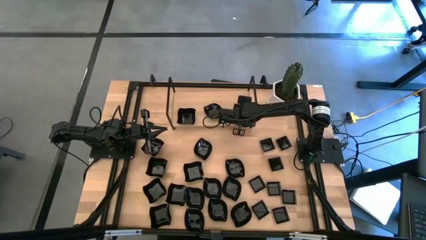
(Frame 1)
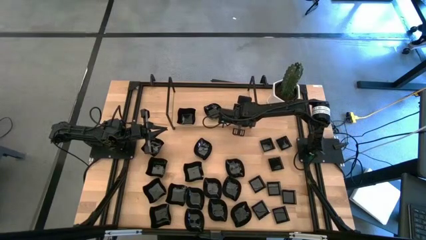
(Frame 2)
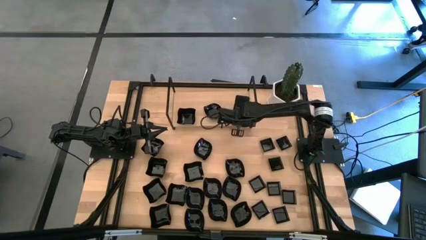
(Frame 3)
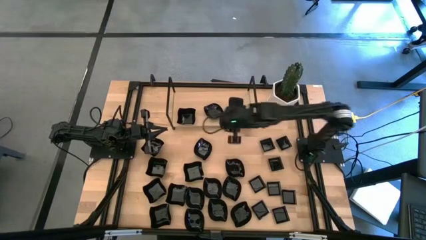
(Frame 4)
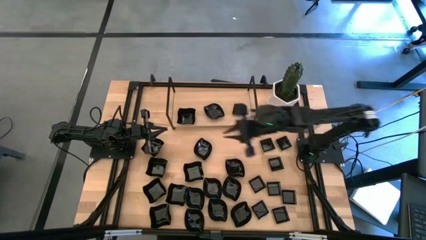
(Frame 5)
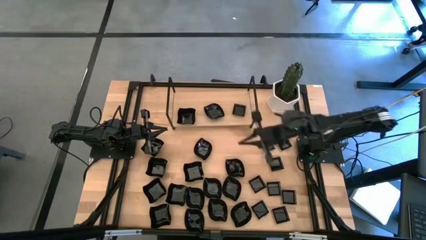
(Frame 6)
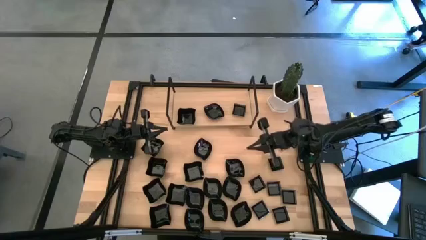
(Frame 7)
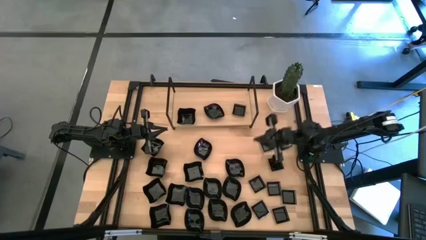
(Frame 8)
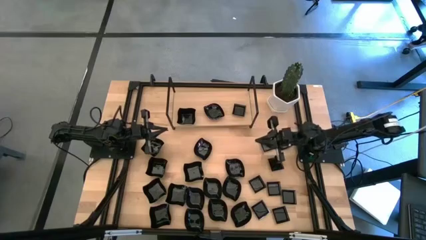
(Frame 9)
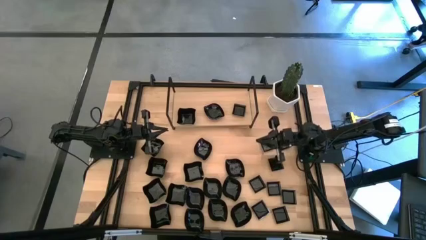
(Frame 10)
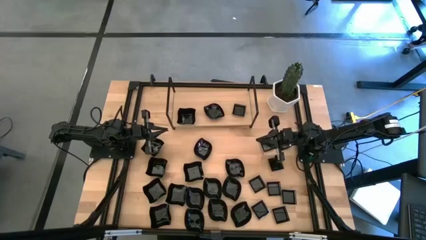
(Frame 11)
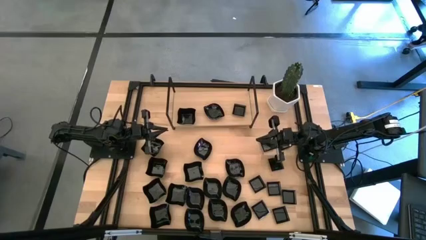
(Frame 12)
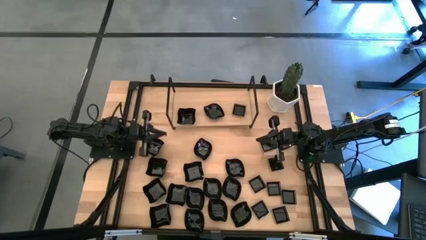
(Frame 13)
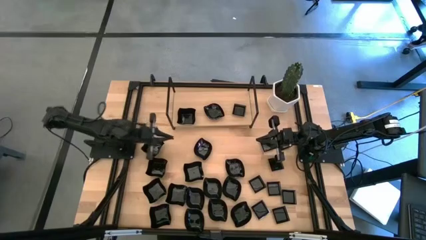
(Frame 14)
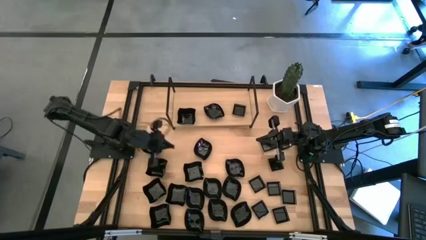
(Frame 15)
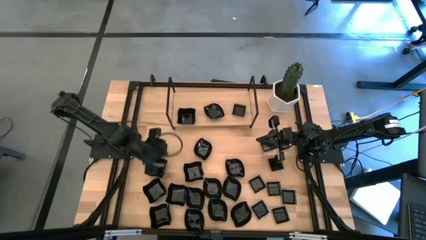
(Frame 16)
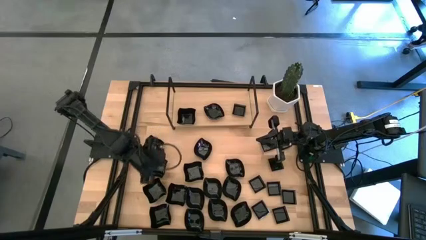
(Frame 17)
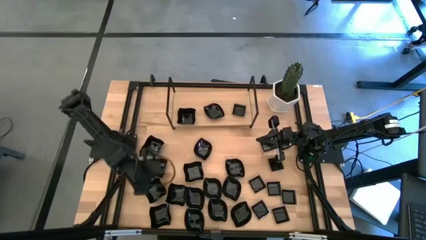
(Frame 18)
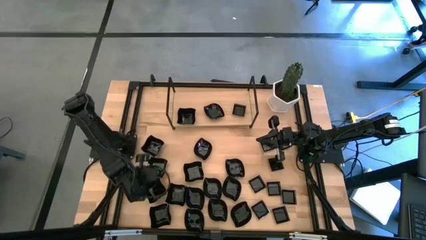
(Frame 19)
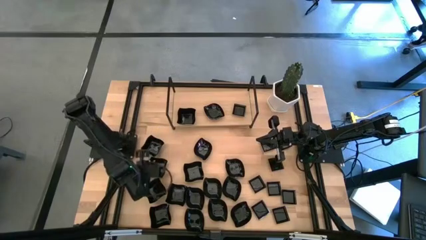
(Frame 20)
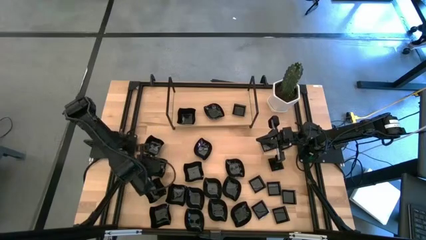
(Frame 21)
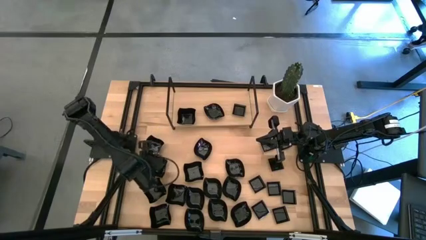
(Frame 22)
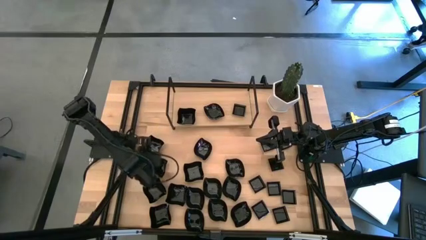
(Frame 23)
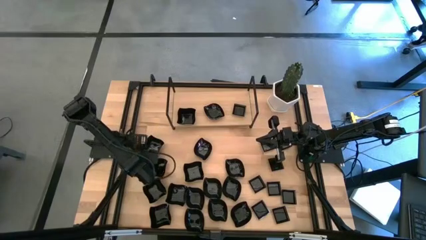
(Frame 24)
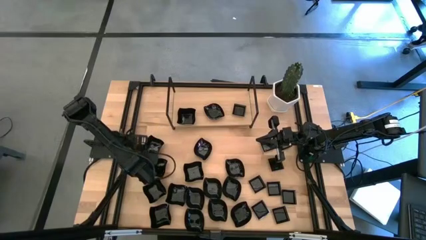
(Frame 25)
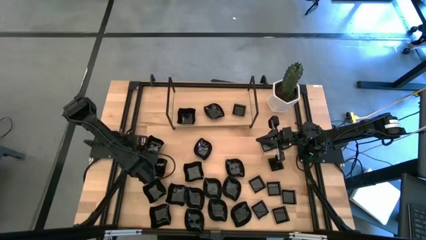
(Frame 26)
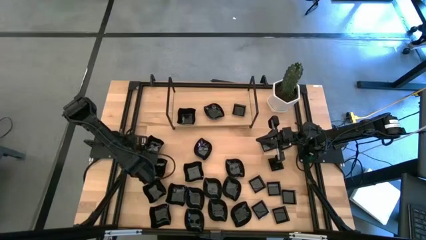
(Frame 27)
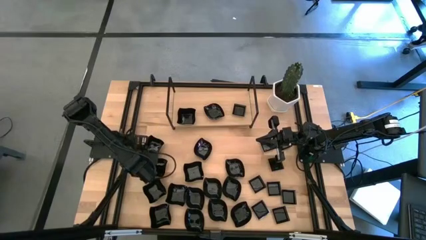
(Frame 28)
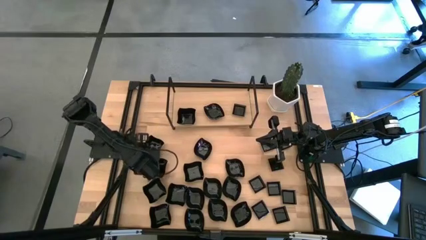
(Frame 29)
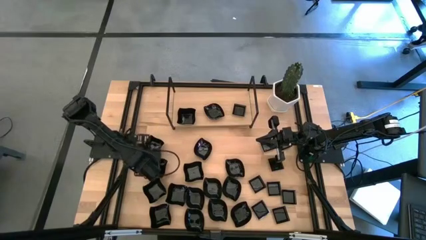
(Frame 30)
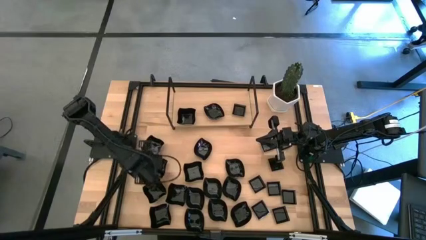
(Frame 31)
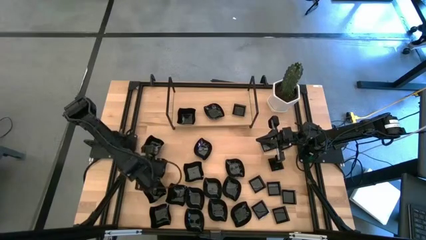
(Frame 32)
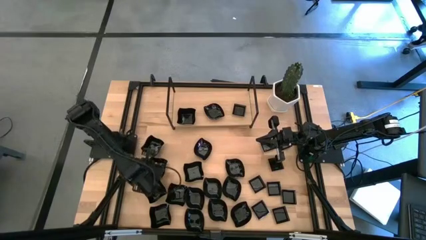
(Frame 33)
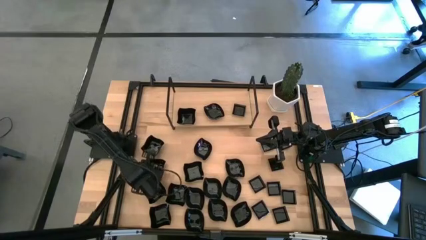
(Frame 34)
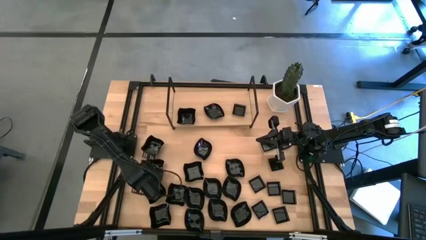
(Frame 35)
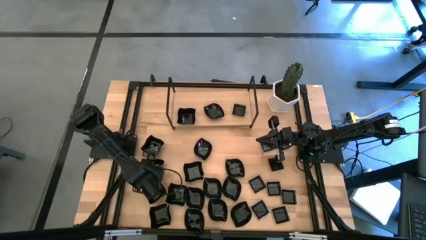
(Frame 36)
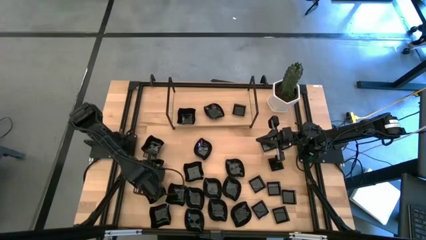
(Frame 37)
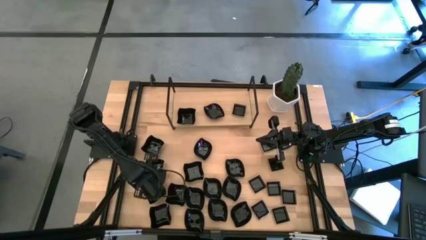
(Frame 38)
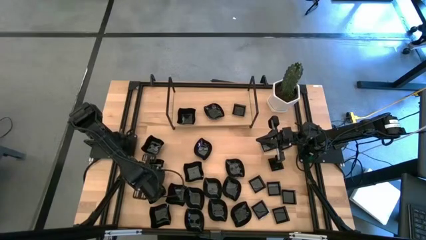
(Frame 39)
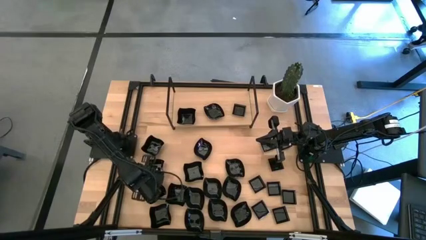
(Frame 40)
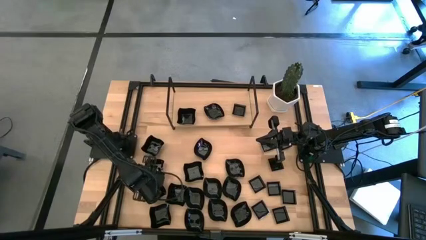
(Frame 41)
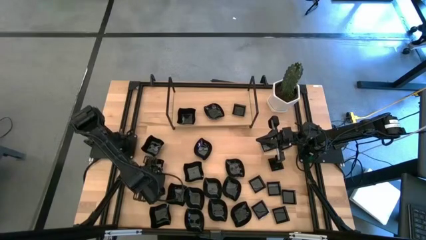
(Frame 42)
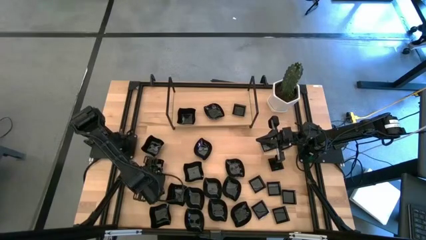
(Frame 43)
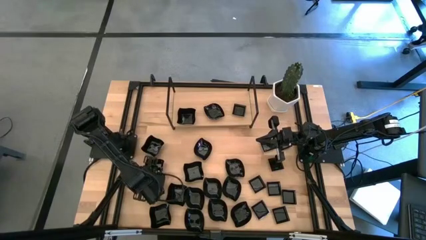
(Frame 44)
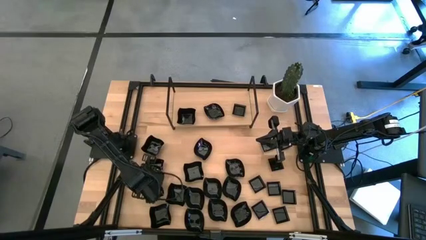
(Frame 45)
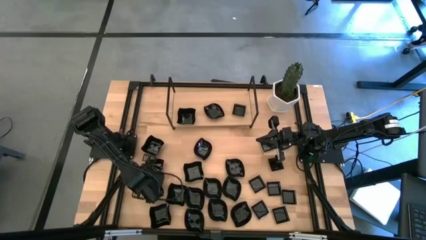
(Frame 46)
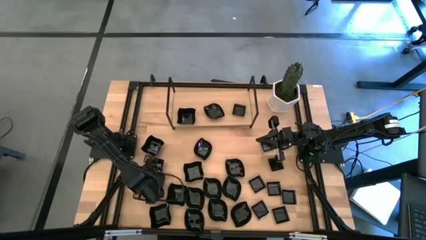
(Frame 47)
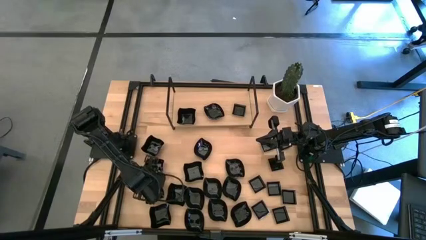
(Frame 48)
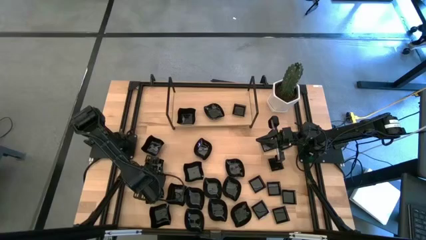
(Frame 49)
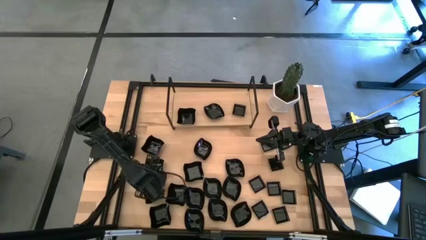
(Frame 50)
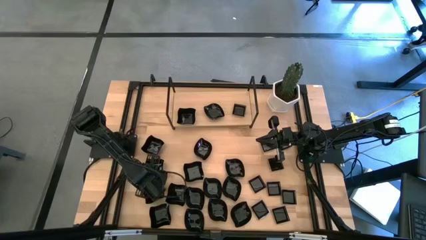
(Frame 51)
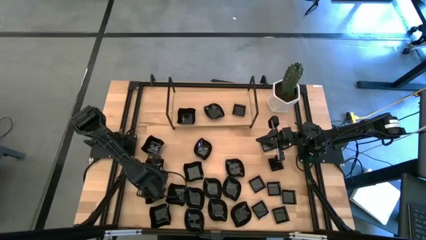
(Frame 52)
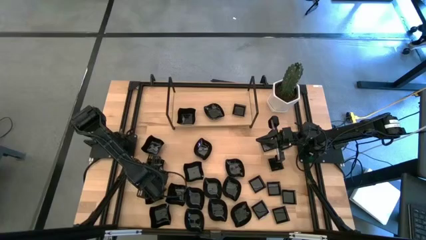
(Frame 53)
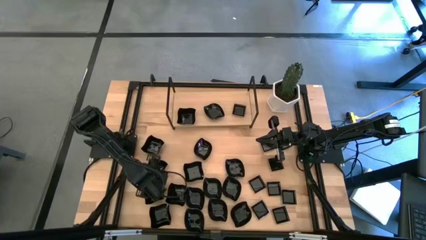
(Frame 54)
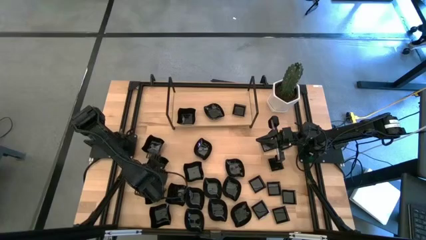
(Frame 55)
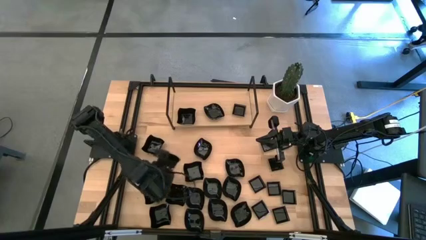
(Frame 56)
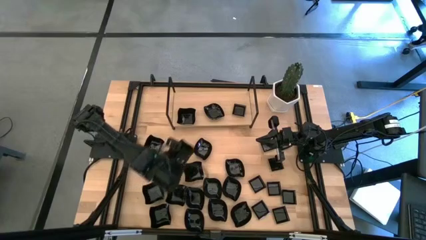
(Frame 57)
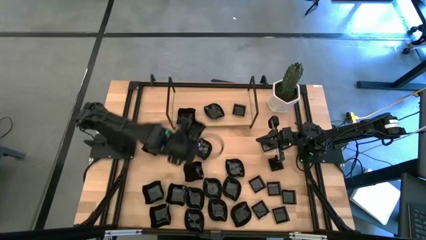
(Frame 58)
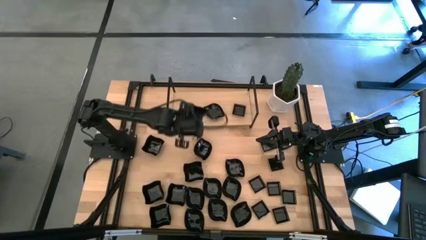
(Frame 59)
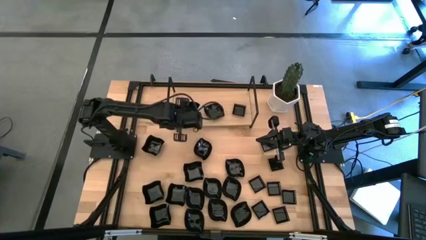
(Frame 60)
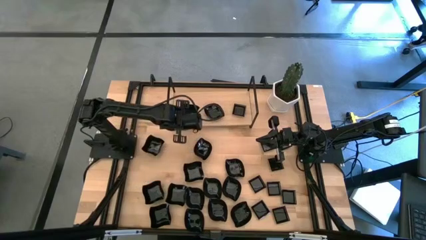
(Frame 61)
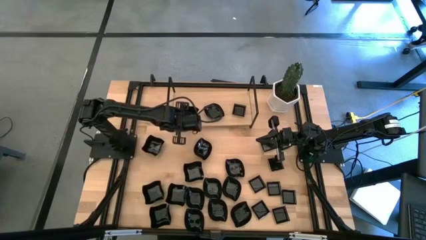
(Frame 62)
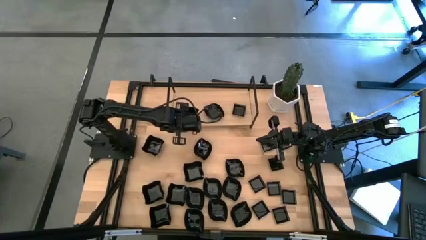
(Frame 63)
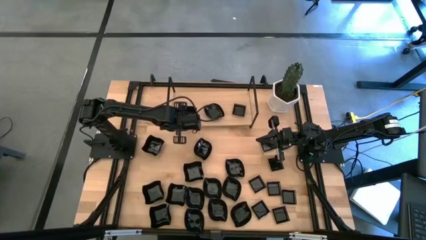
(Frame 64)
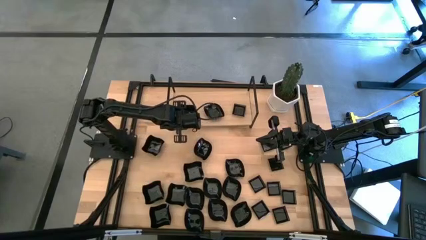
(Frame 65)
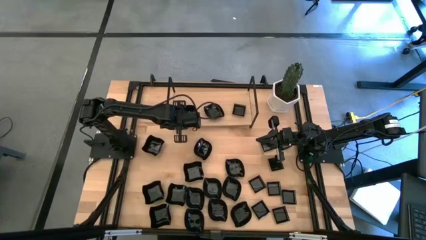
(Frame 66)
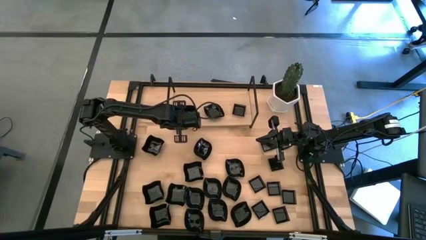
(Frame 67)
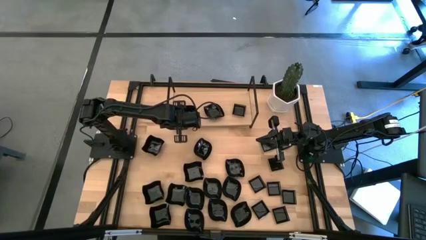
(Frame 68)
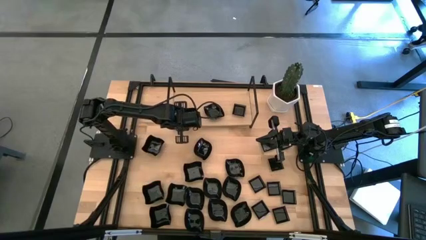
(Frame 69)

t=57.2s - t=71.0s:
Task: Pick & Place Mini shaped plates
Stack the black distorted square plate on top of the black distorted square plate on the shelf

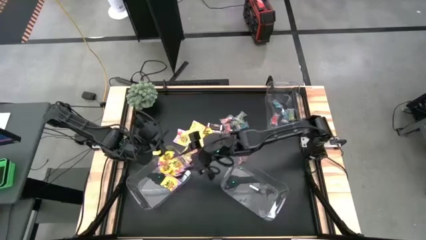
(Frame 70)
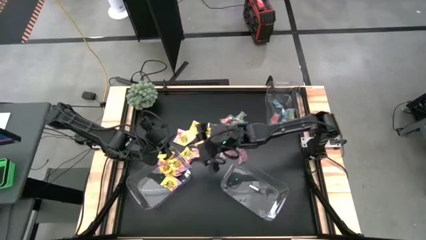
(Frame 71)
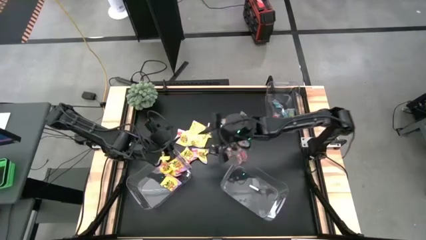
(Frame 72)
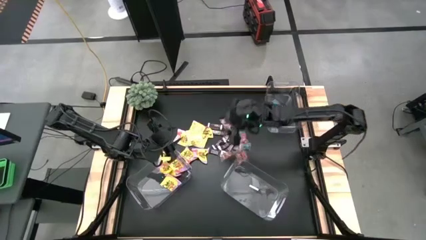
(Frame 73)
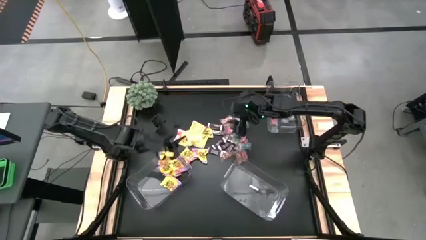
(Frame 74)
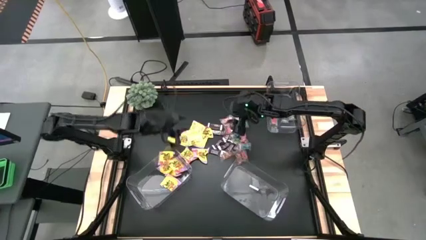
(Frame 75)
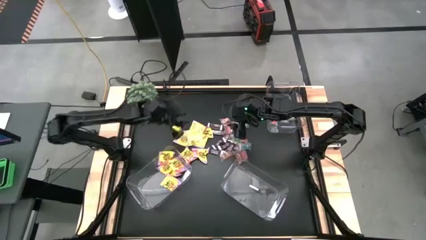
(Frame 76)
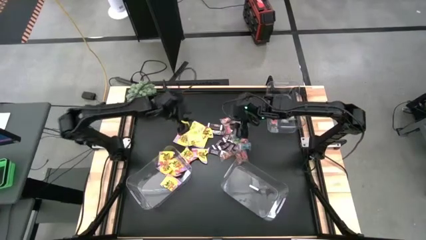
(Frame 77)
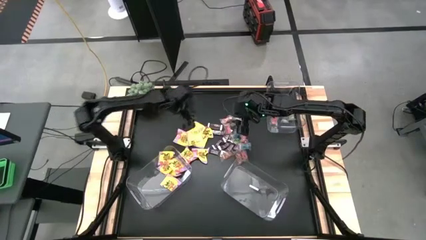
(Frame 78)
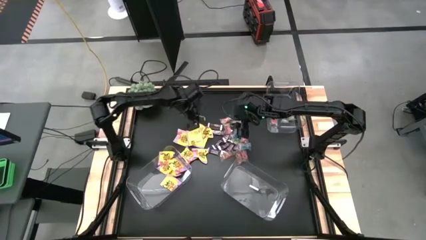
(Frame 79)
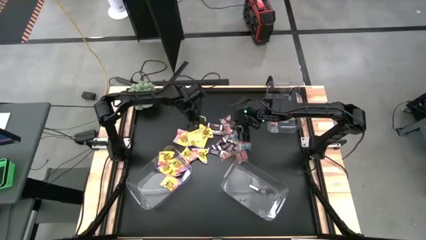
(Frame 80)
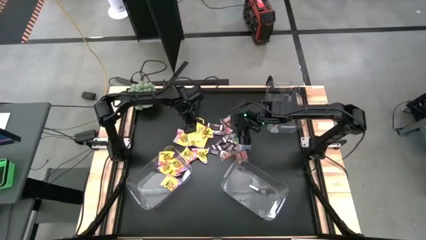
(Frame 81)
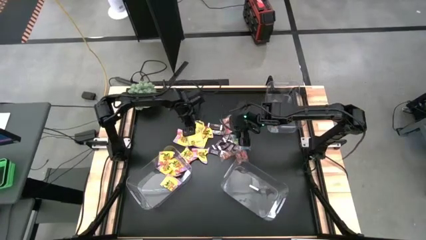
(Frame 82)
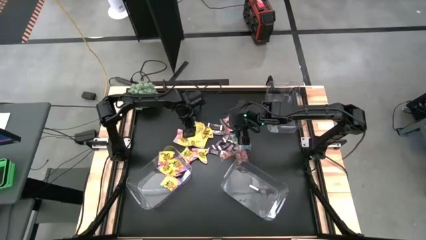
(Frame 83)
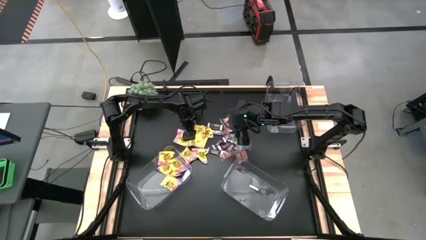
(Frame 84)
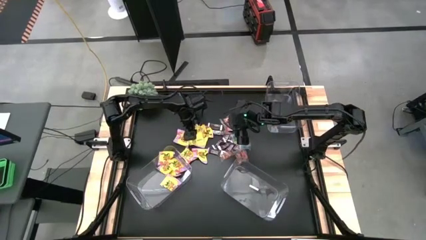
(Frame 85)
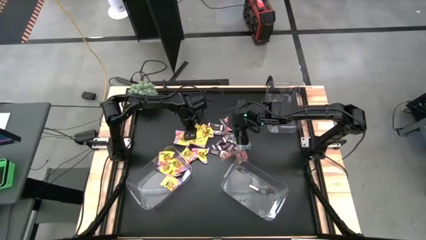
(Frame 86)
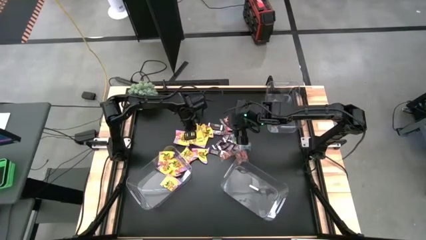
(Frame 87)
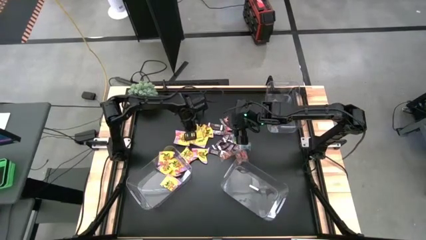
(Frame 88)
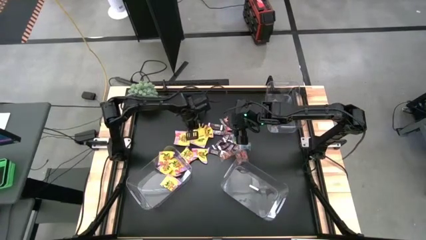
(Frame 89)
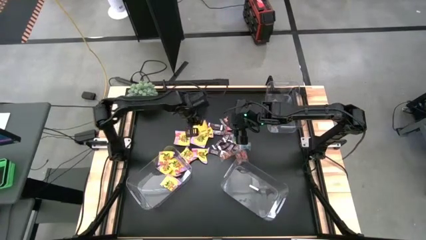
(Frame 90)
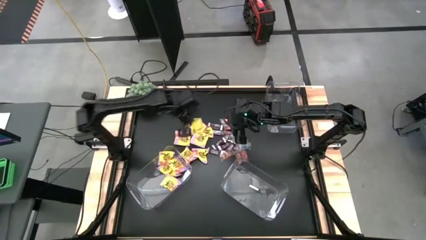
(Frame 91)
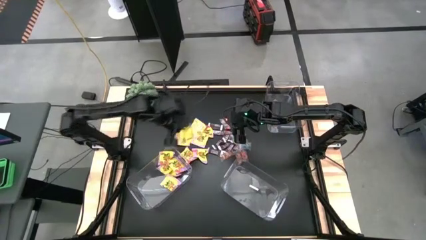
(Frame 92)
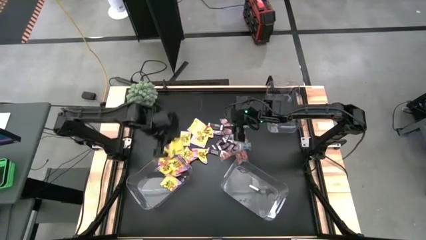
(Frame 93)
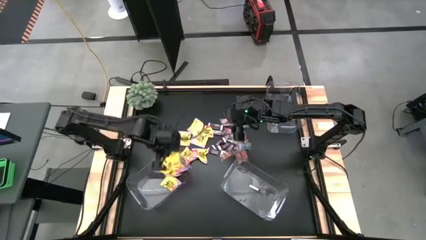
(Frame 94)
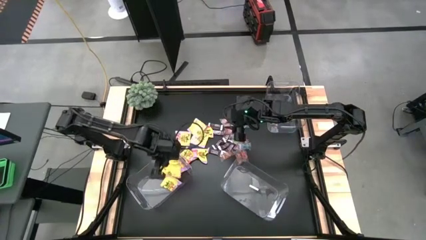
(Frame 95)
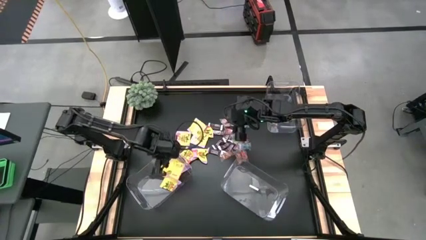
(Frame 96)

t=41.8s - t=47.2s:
Task: Sort candy
Put the yellow candy in the bottom left transparent container
